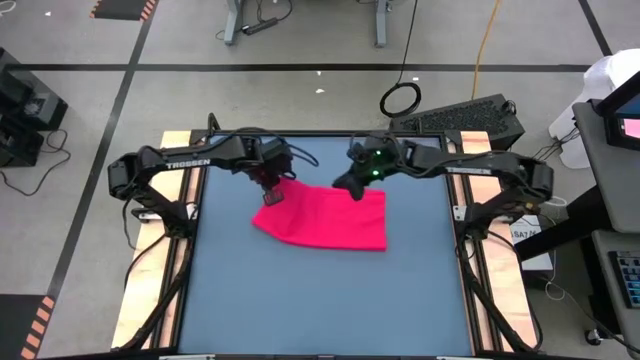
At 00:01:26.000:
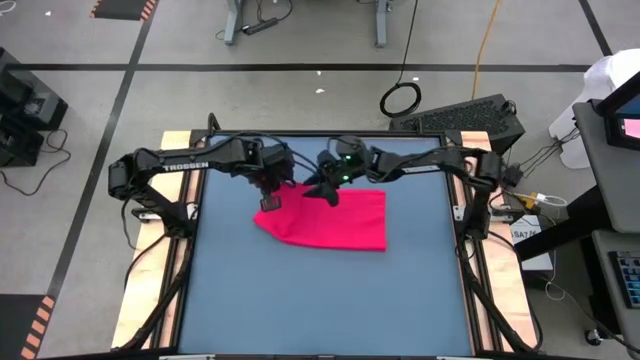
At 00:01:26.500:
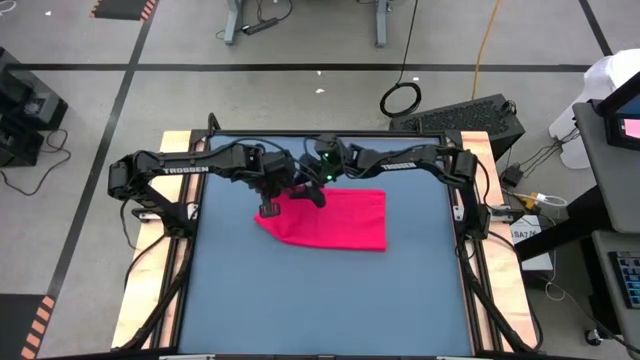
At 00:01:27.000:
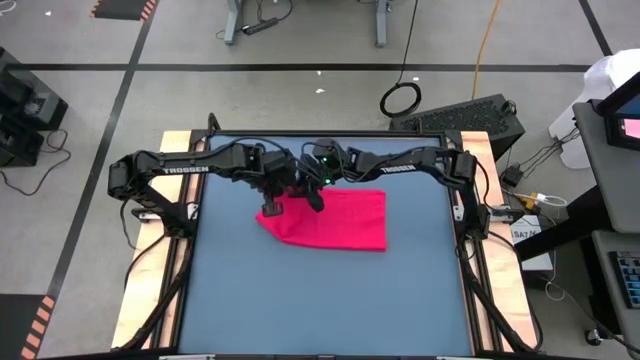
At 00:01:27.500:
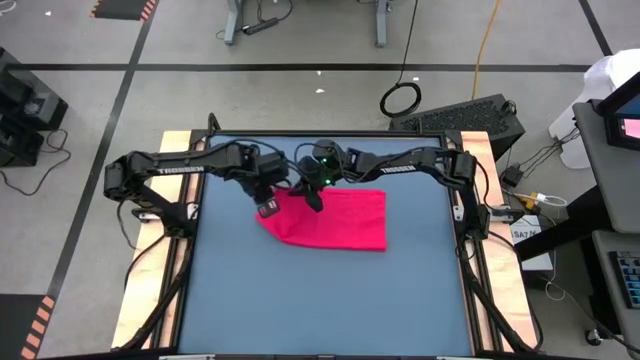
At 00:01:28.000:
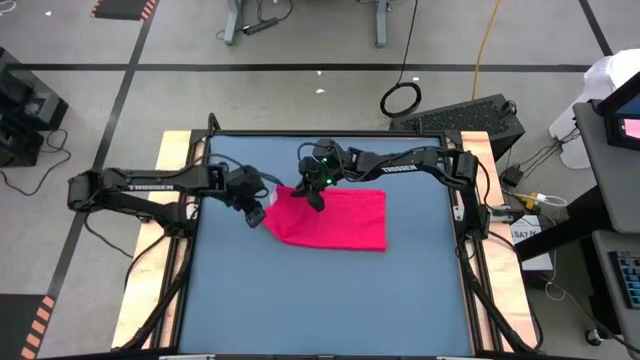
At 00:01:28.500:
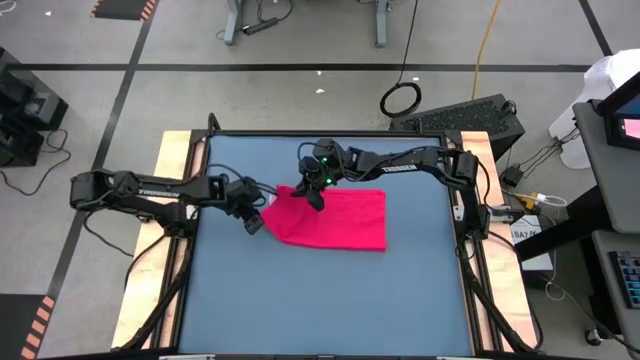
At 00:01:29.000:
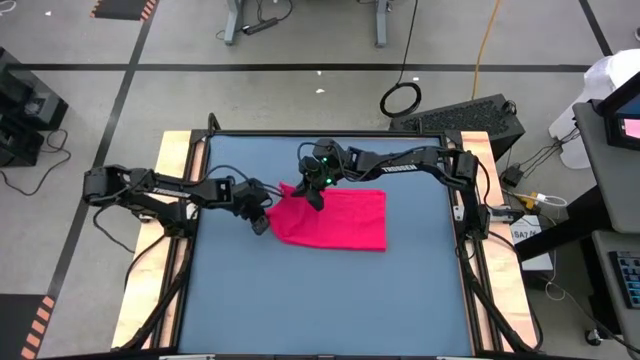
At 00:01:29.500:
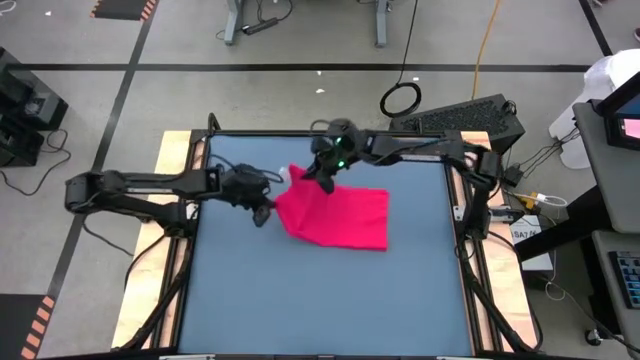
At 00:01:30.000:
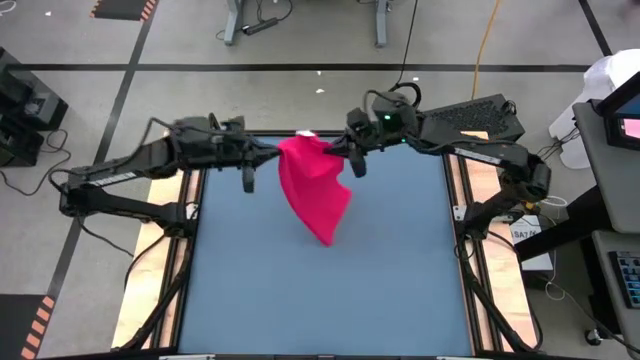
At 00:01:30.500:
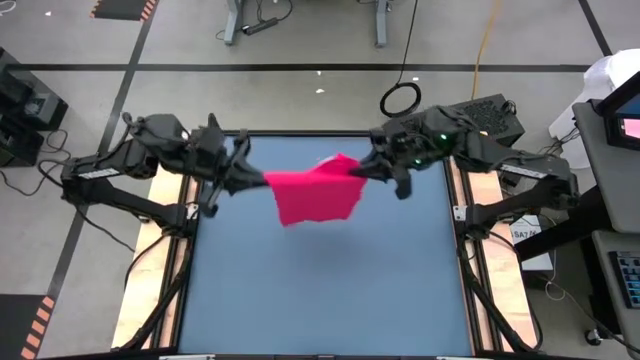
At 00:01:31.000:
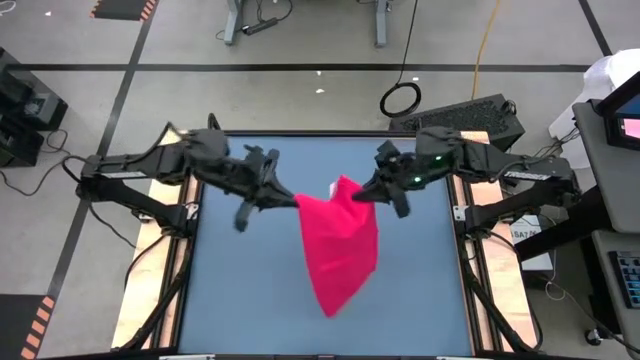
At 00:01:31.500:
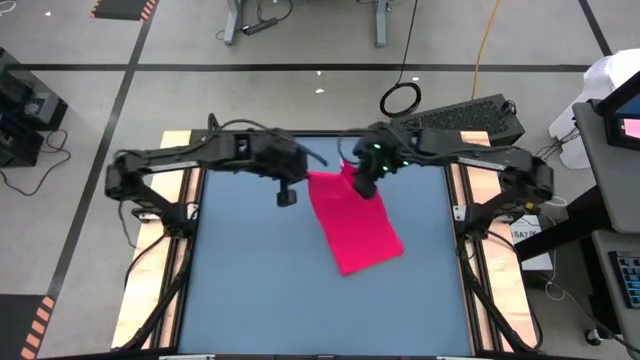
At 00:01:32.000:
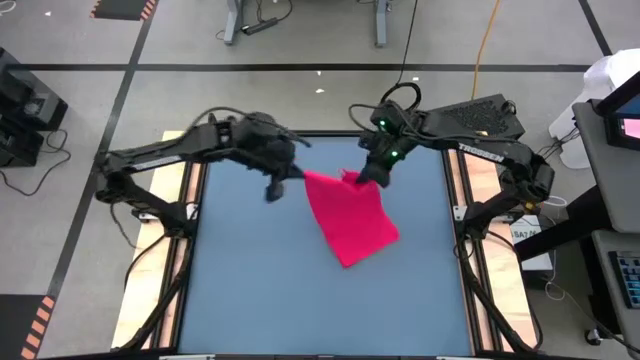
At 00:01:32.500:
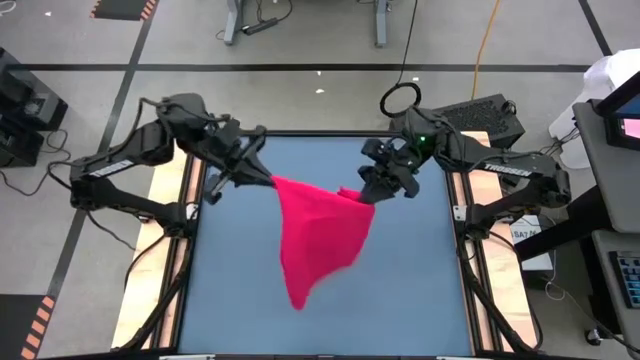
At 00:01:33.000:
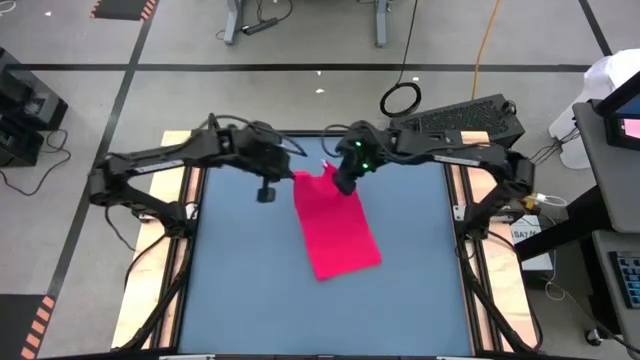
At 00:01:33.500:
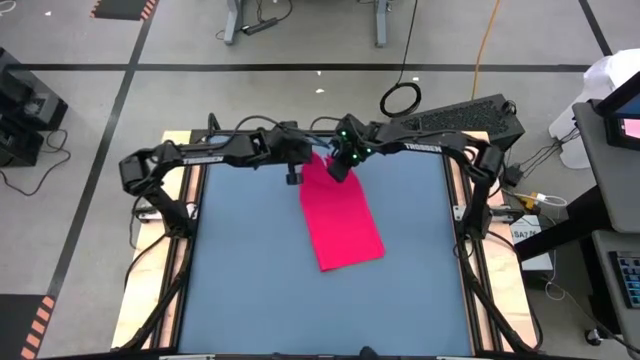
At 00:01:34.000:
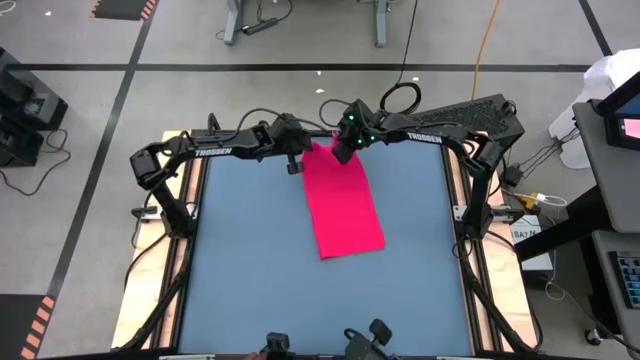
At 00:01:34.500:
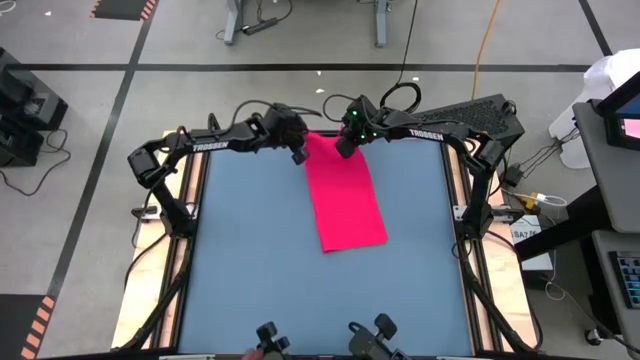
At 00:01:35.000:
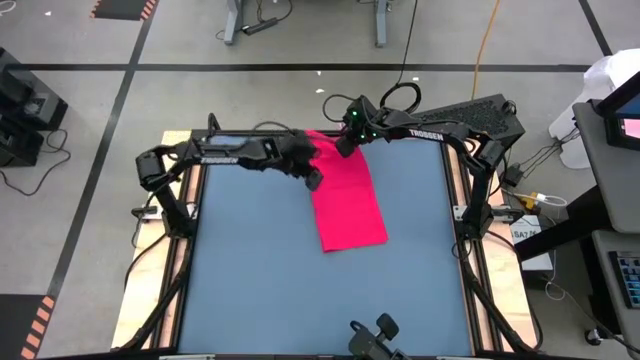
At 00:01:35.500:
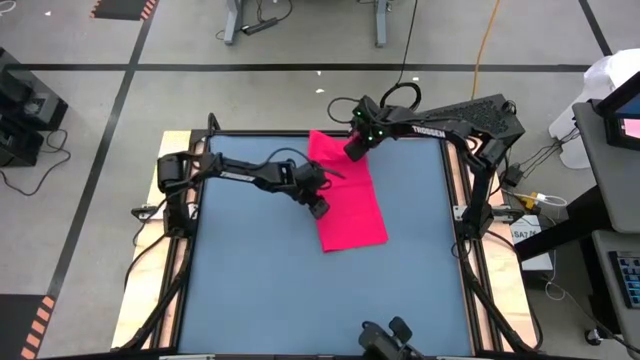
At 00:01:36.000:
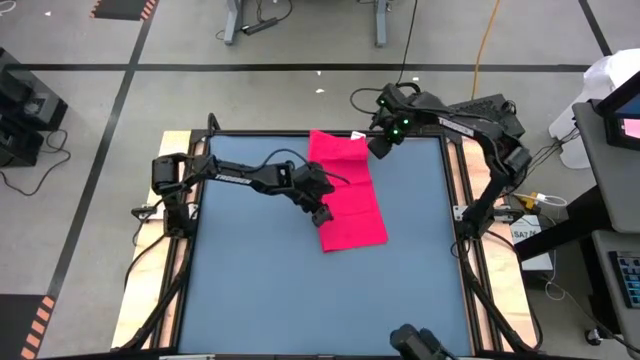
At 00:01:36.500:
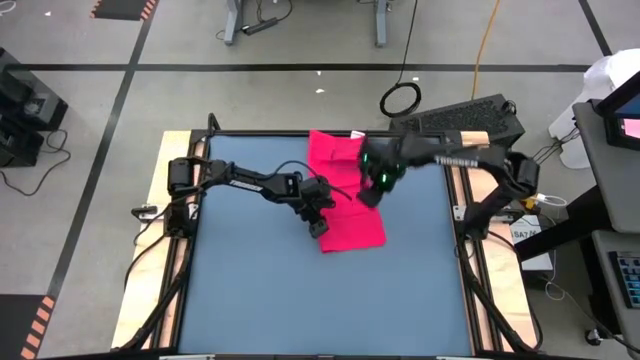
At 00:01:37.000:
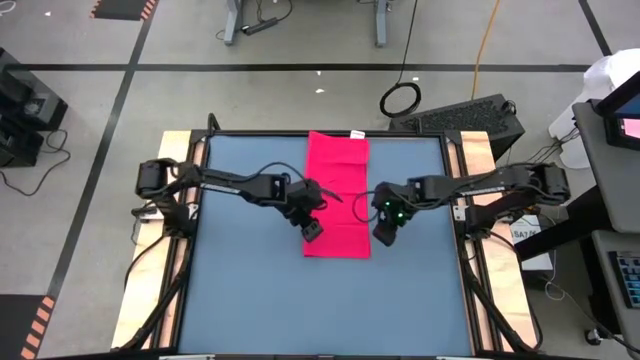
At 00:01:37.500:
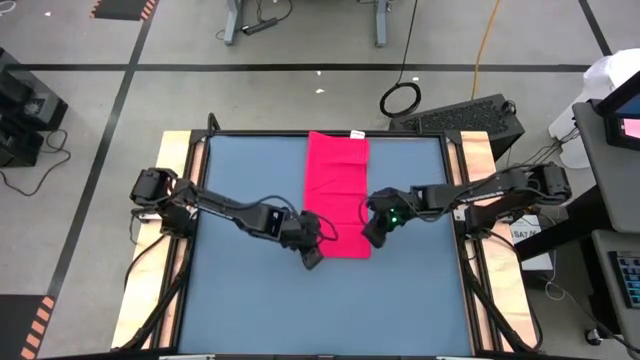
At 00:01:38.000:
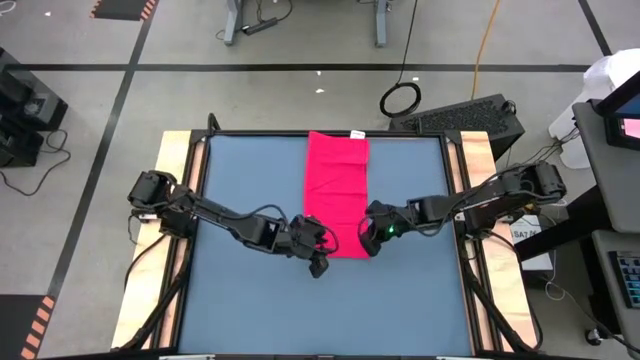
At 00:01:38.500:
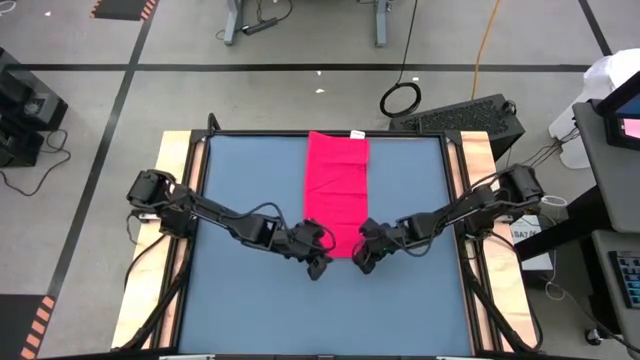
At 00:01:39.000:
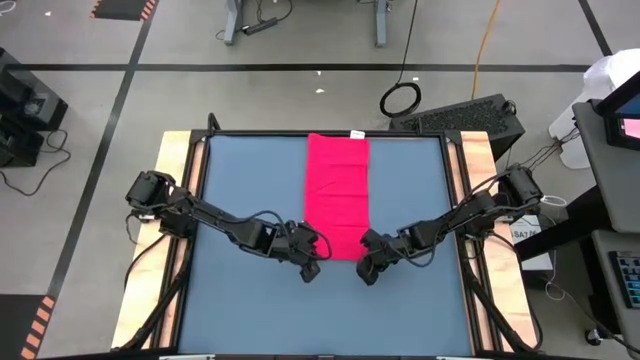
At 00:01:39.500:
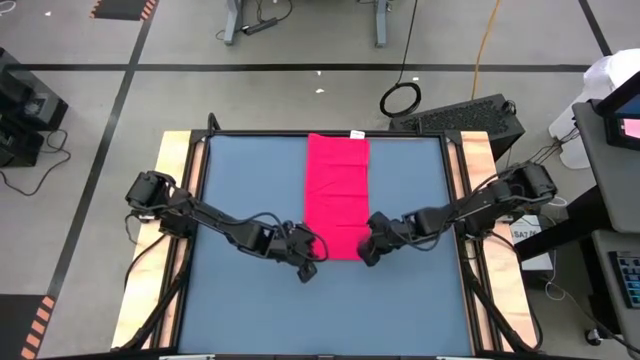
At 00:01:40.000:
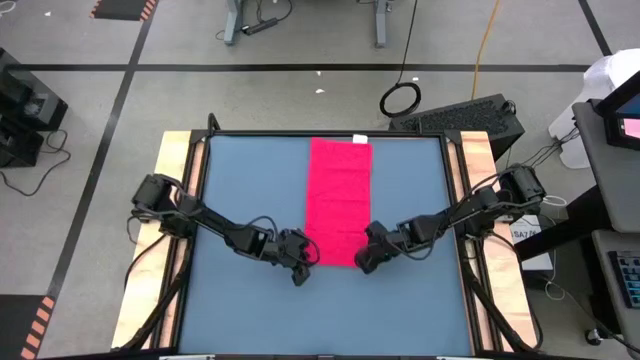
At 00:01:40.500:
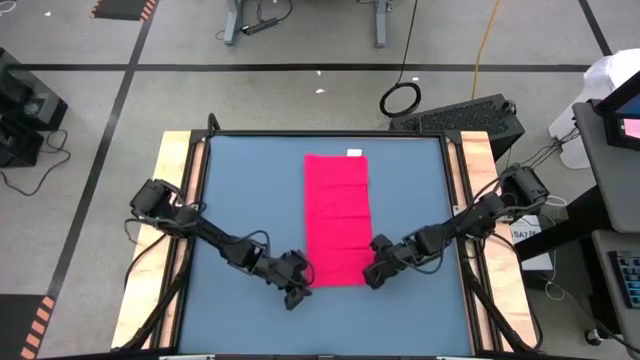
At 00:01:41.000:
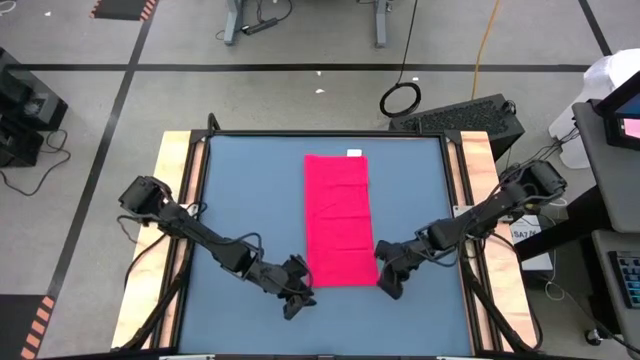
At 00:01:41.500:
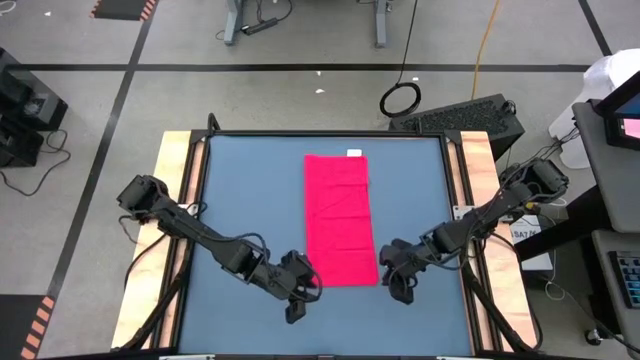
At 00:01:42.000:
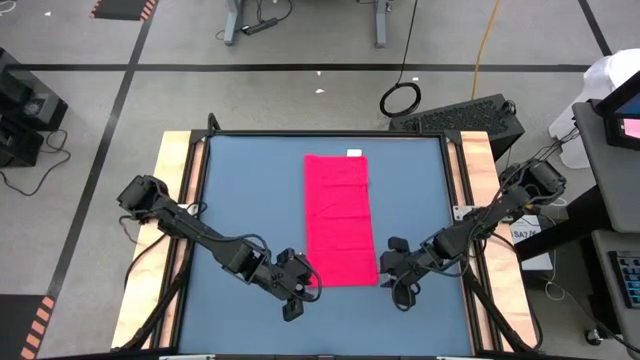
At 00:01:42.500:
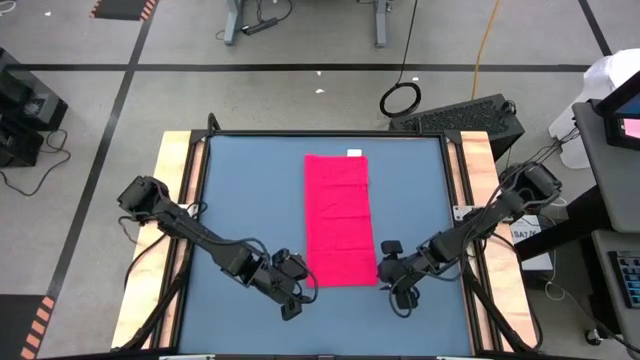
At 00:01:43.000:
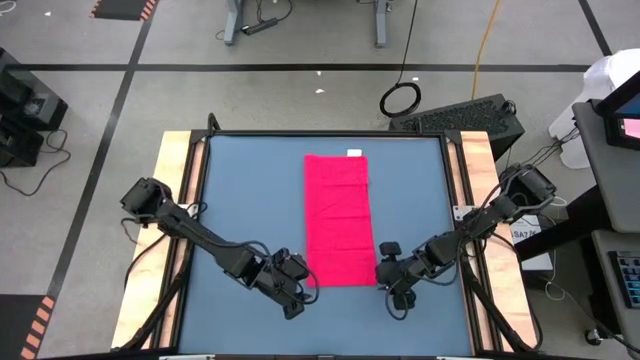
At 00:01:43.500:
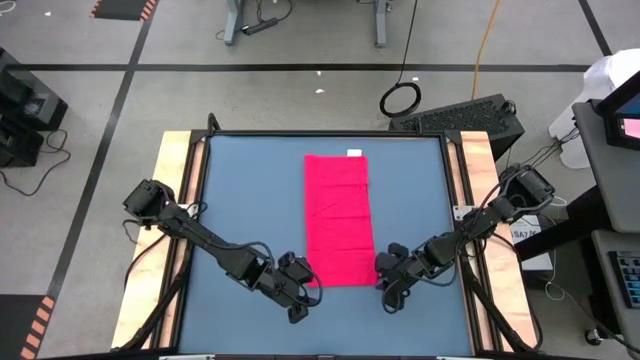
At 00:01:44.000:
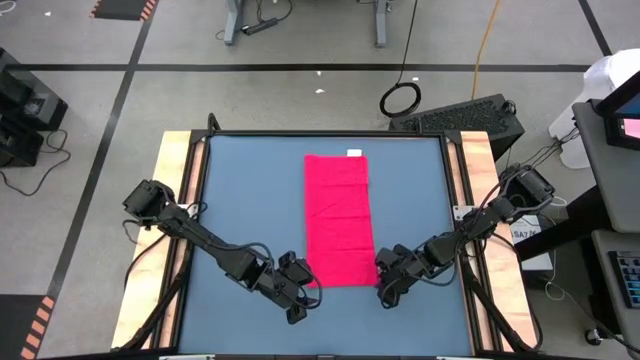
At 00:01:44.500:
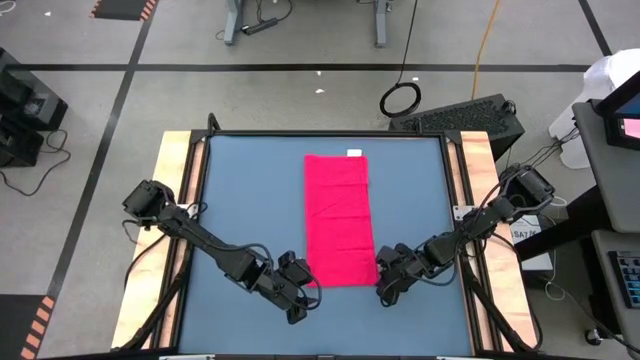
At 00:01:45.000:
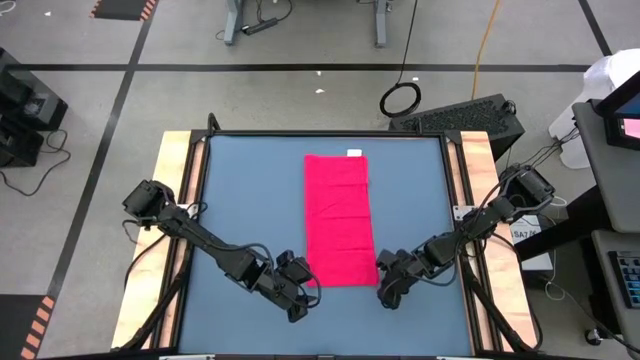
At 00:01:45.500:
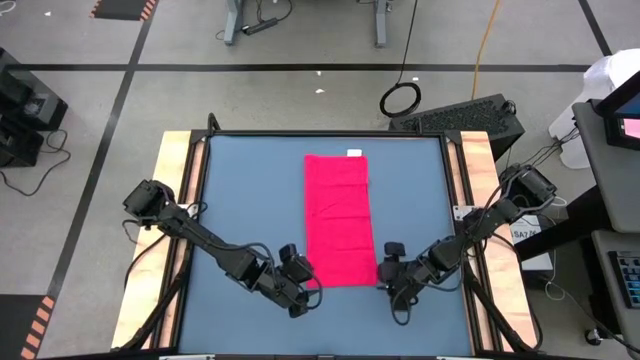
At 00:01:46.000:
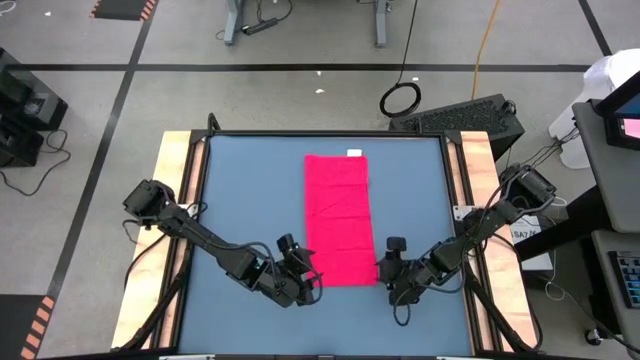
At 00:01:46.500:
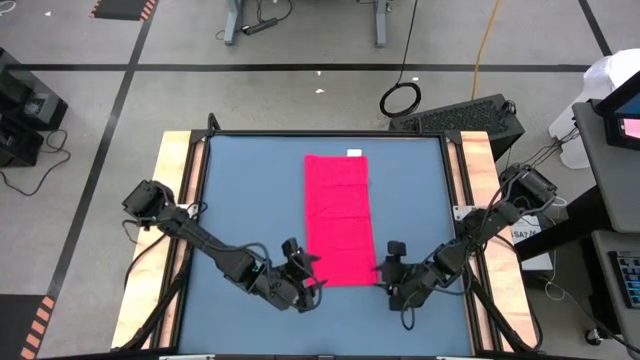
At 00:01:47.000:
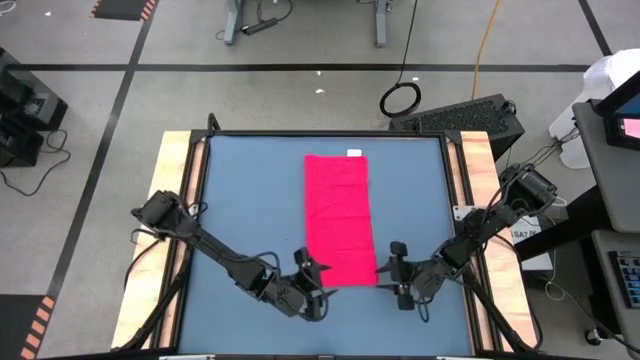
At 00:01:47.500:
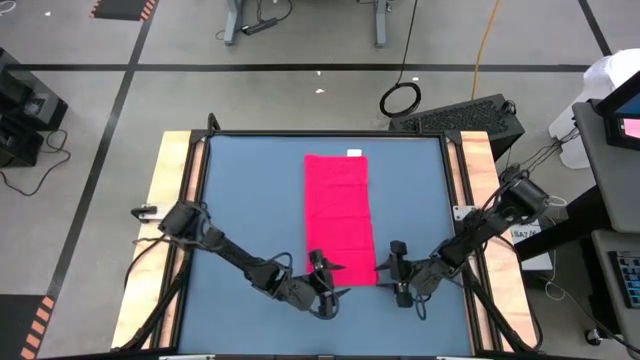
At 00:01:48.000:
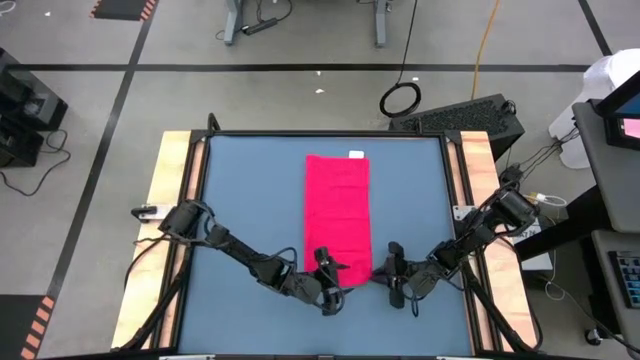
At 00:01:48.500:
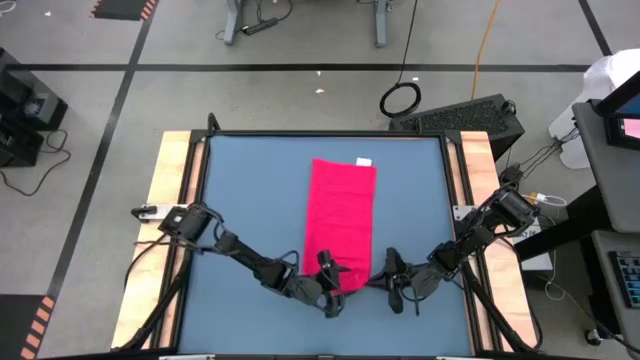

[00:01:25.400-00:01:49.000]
Task: Roll towel
Roll the red towel
